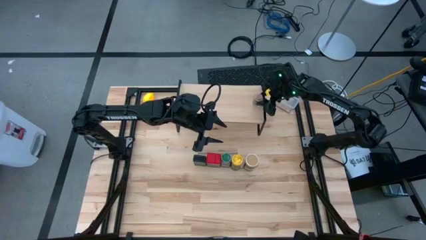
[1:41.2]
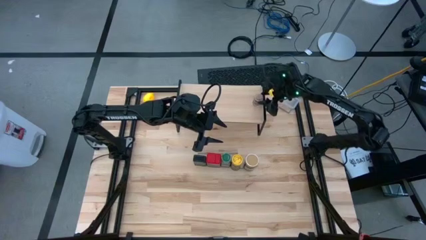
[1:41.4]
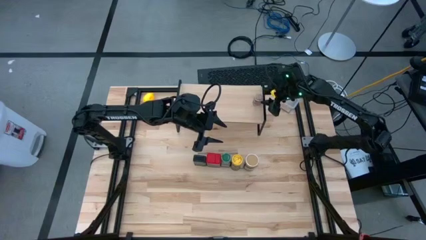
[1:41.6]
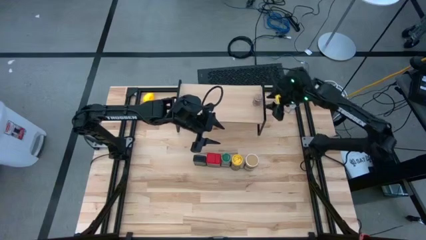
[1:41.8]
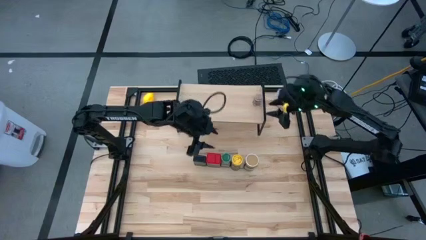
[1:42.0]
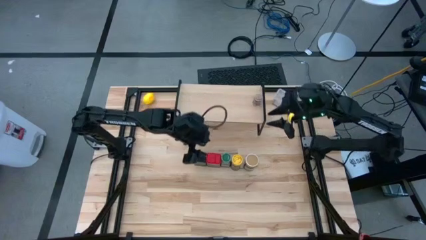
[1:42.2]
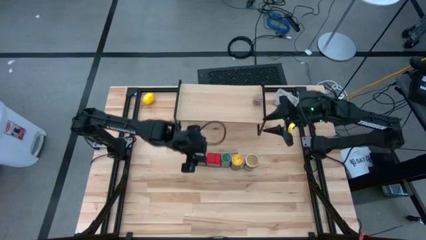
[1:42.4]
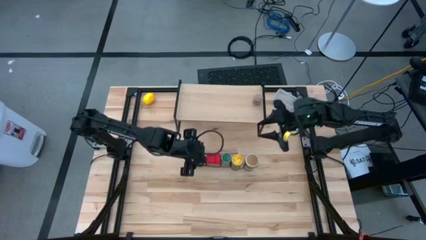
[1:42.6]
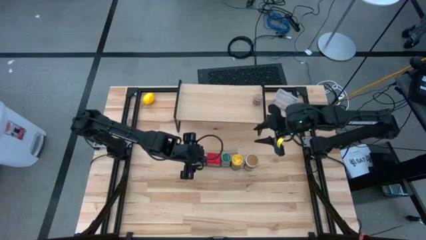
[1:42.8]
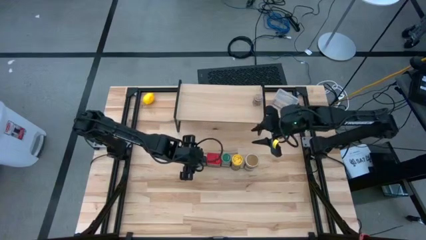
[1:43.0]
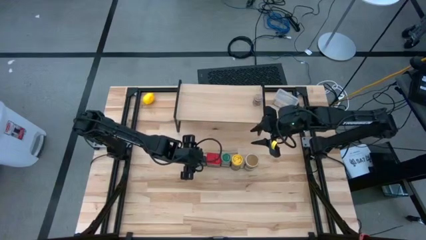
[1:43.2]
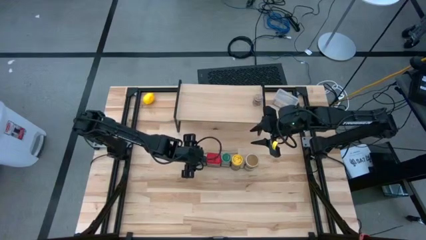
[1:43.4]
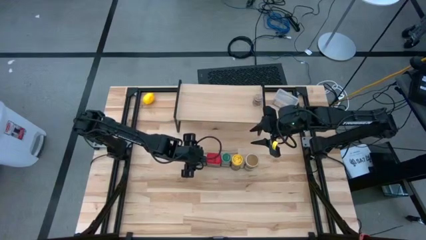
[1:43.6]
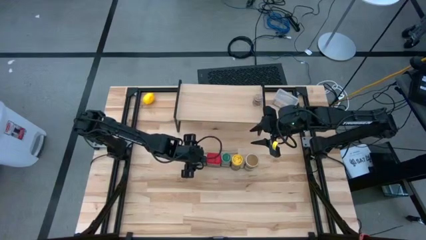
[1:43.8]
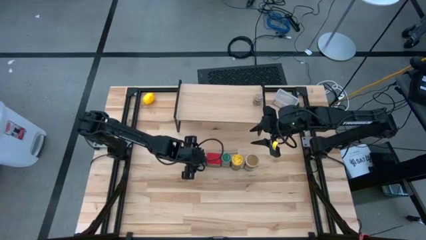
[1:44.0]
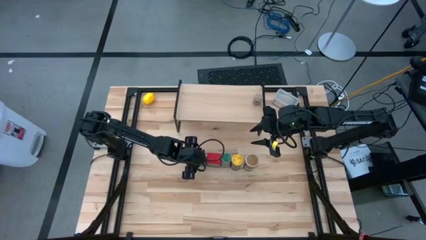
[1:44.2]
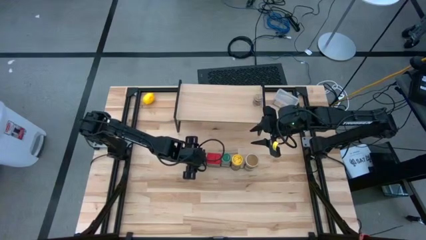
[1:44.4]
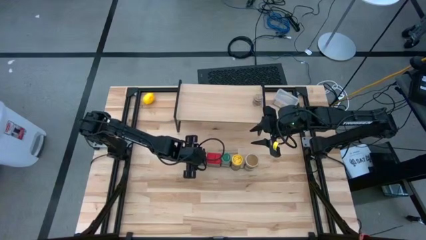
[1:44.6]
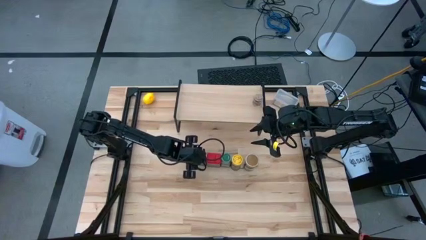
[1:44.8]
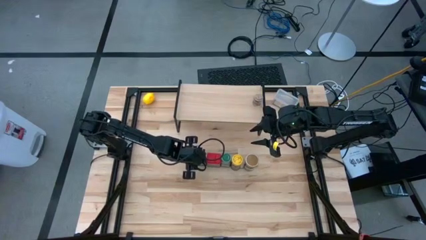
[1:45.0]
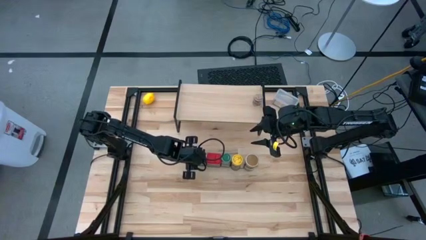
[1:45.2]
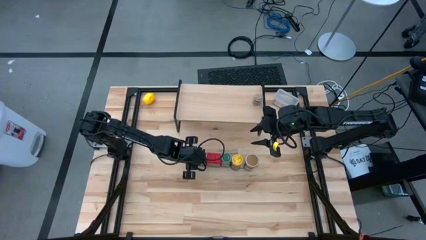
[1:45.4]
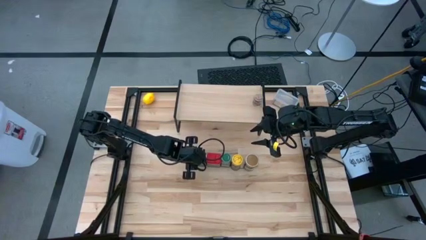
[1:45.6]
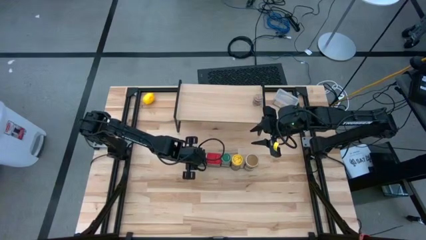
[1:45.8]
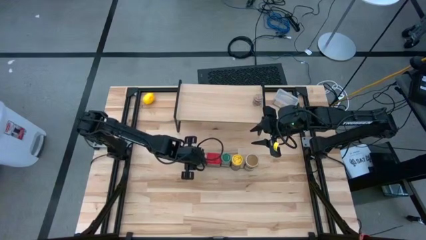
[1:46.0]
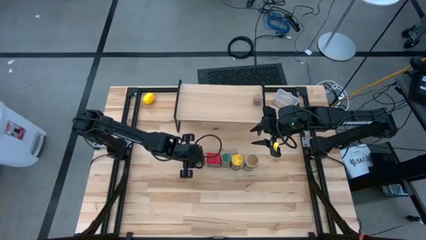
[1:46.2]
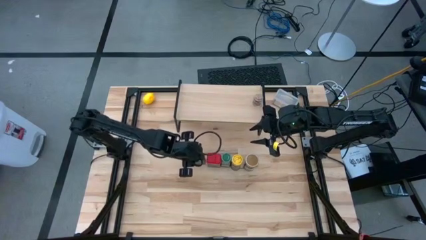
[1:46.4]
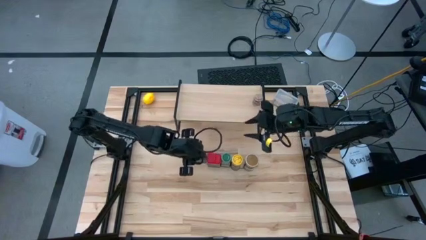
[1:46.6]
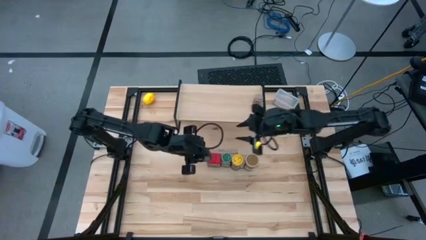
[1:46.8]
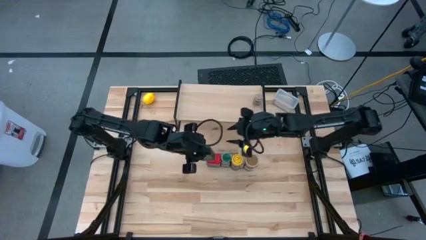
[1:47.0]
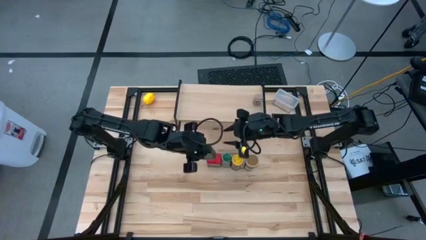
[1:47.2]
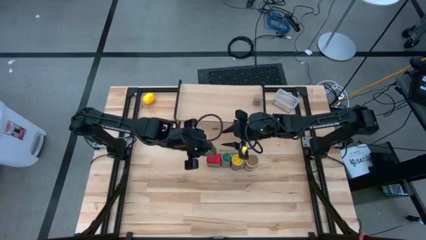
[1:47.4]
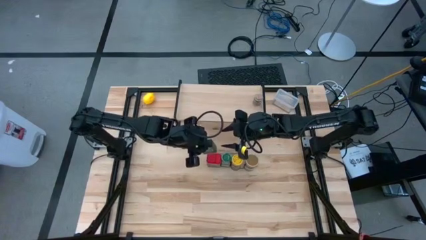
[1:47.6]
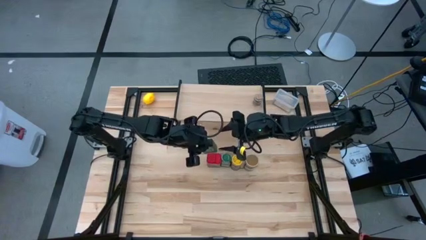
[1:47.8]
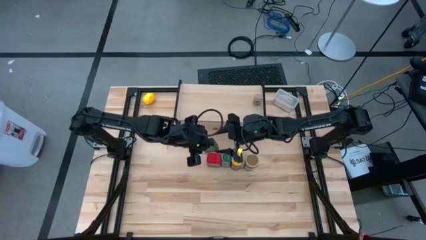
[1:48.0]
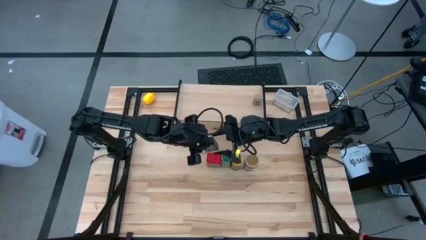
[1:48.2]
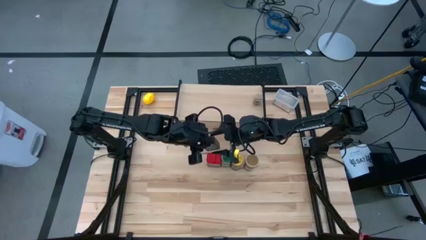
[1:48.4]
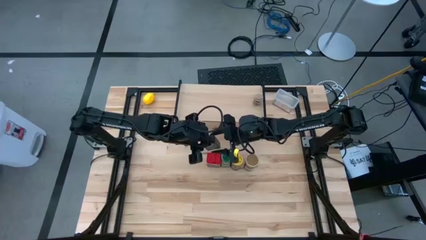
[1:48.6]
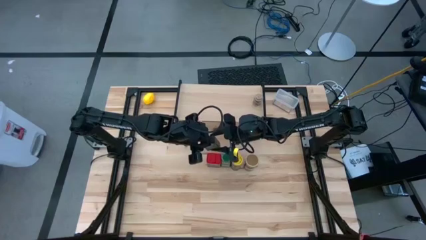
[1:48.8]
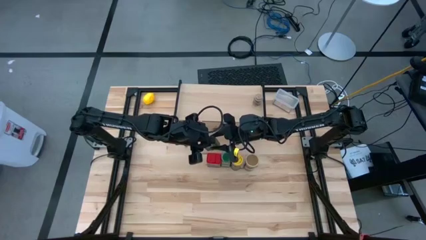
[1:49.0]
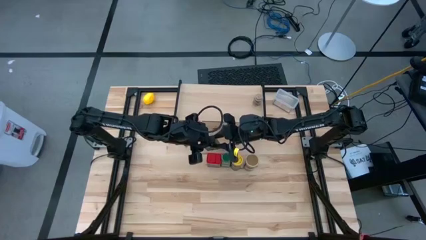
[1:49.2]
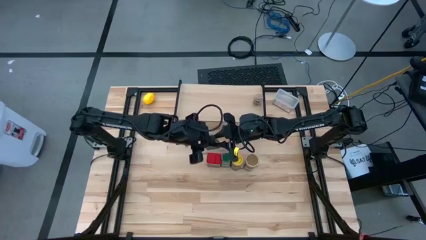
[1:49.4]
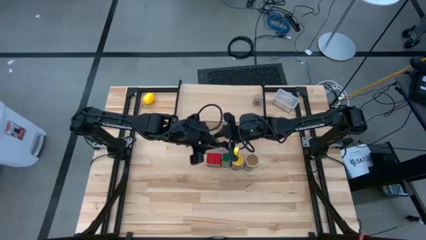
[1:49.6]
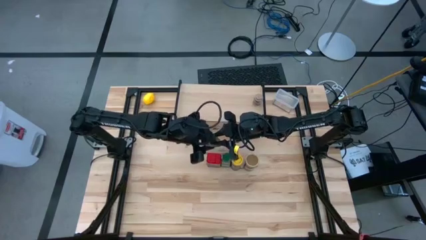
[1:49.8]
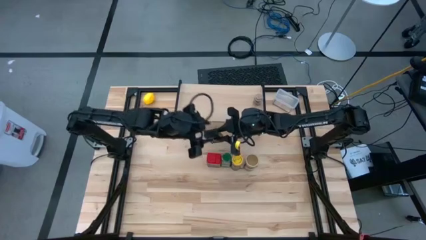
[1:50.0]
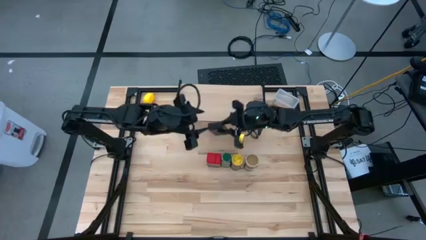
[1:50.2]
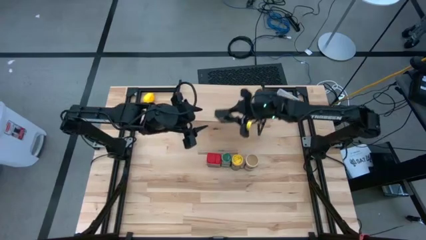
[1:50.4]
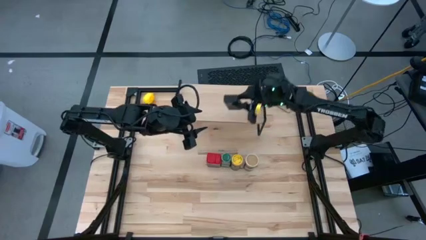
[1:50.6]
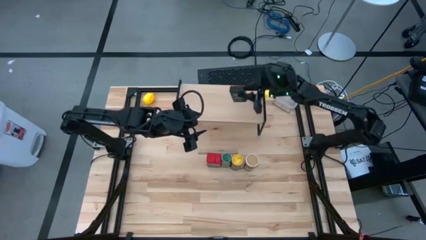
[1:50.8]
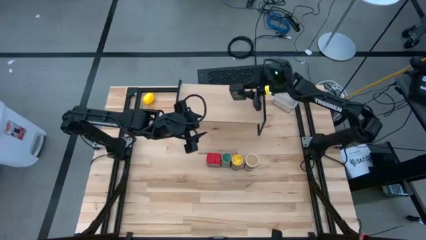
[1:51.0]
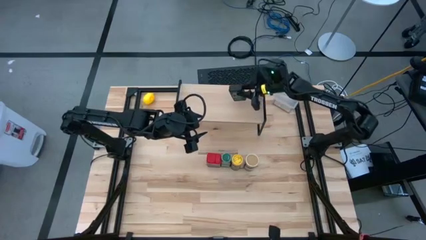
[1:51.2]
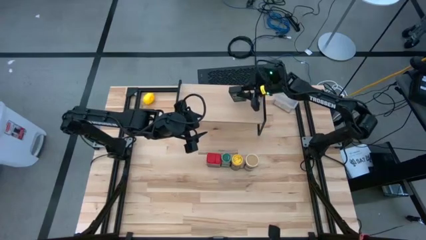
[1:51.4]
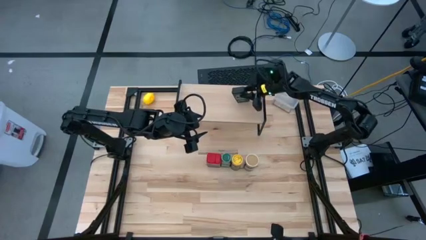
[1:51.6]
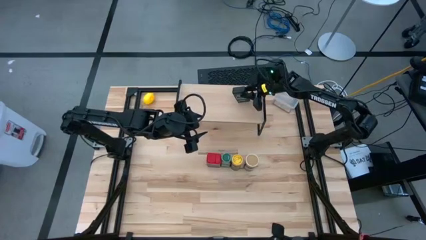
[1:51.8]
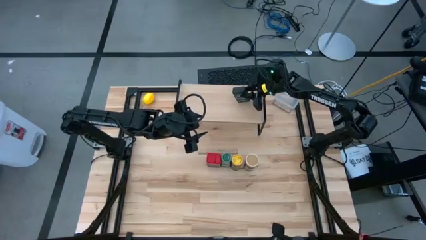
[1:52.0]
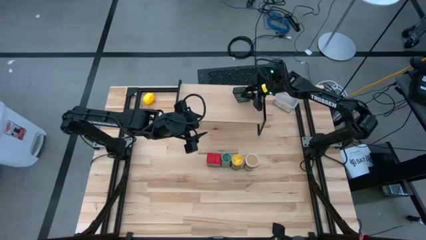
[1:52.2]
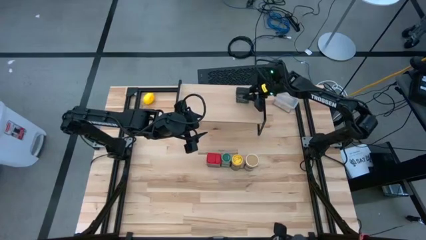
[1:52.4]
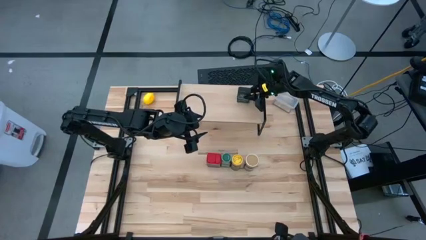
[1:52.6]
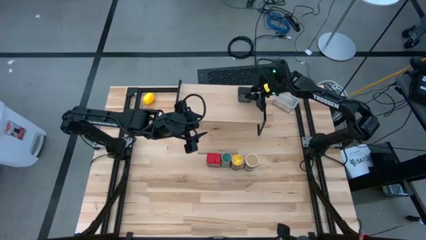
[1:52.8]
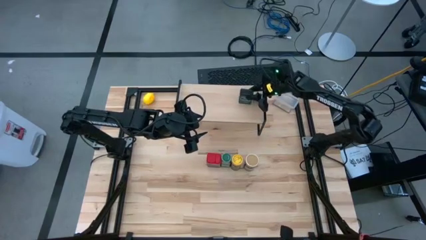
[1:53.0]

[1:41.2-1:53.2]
Task: Shelf spices
Put the black seasoning can on the shelf
